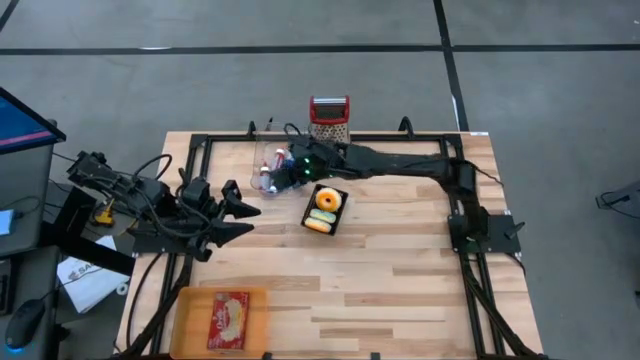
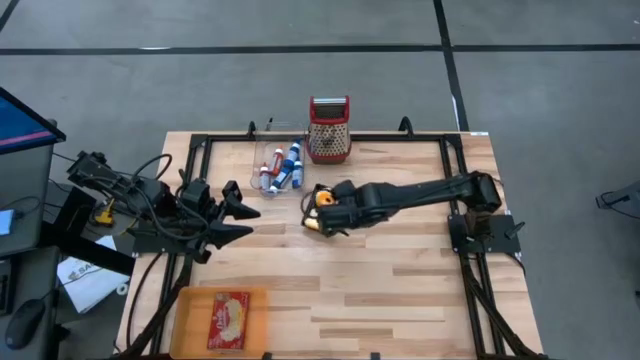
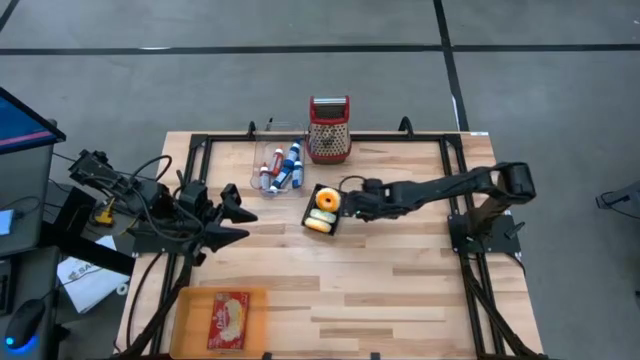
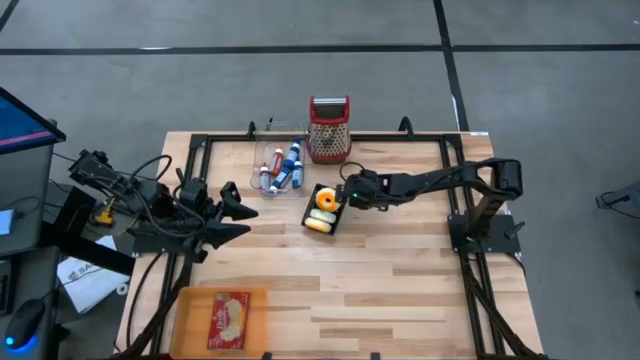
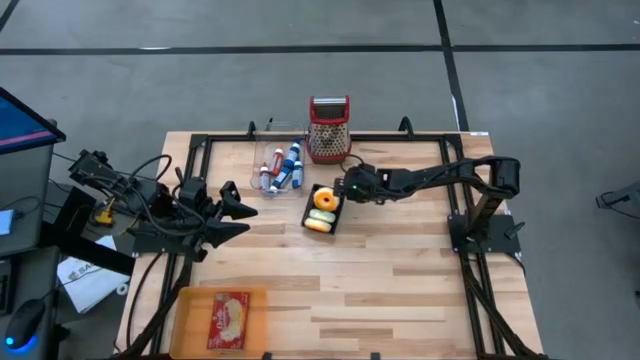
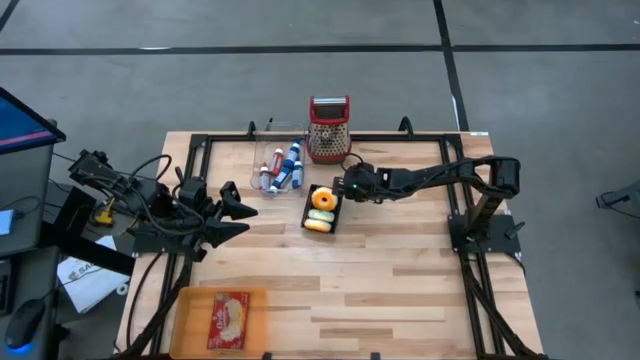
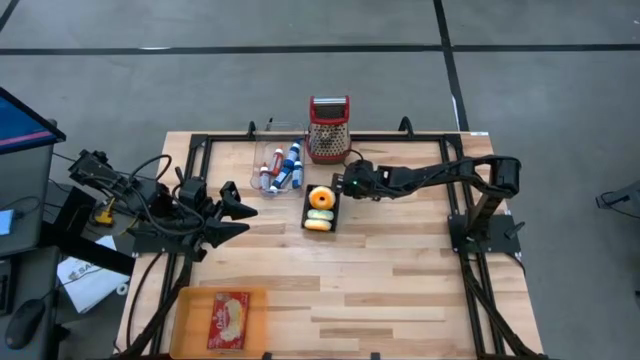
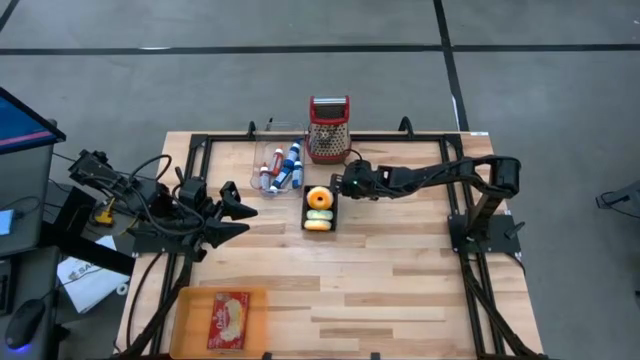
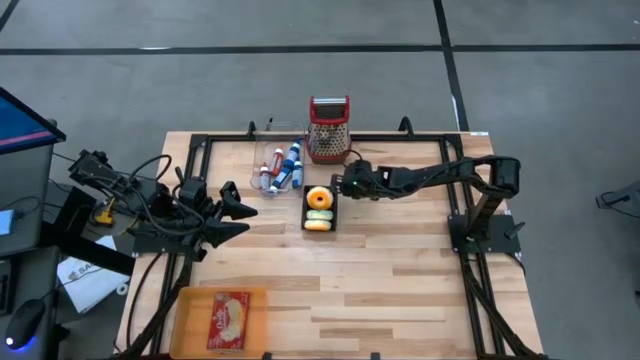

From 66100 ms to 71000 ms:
Adjust the black bin

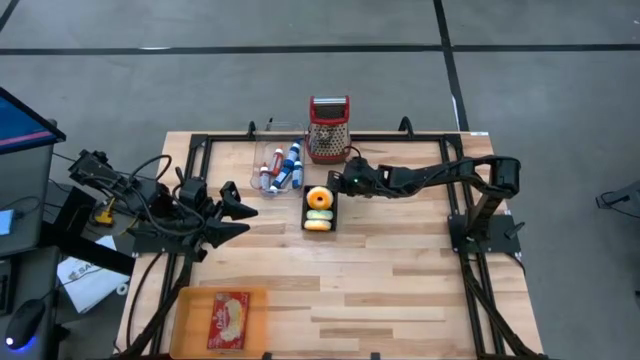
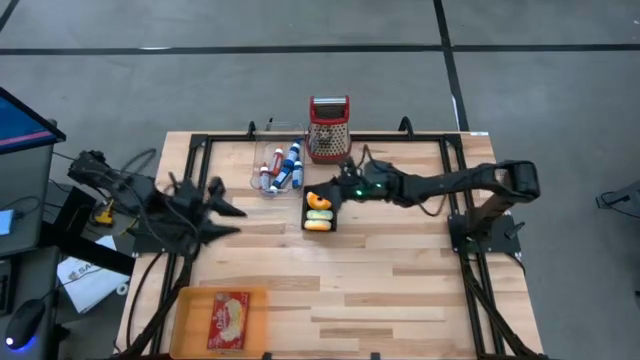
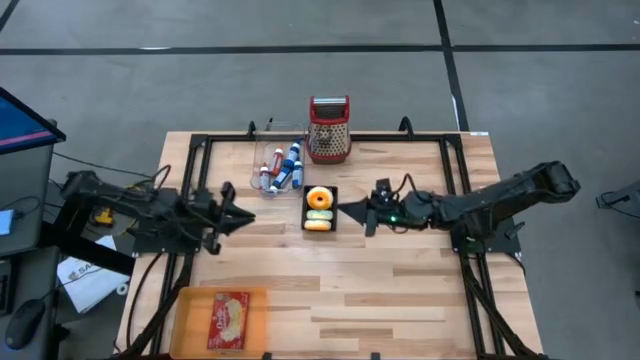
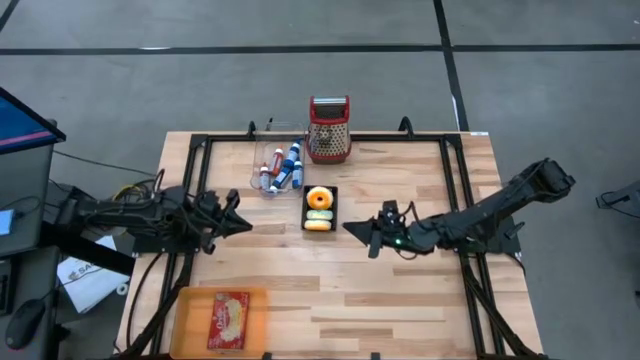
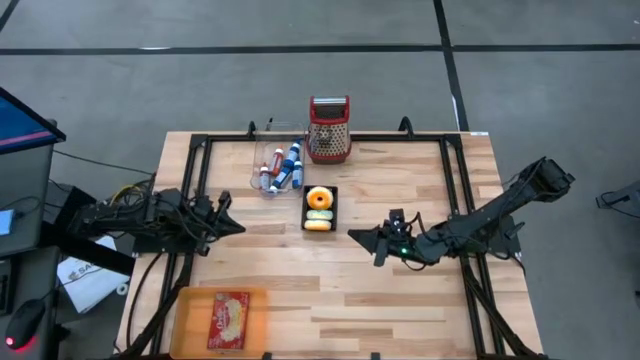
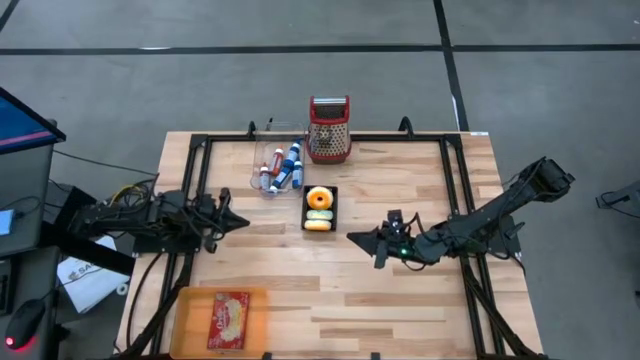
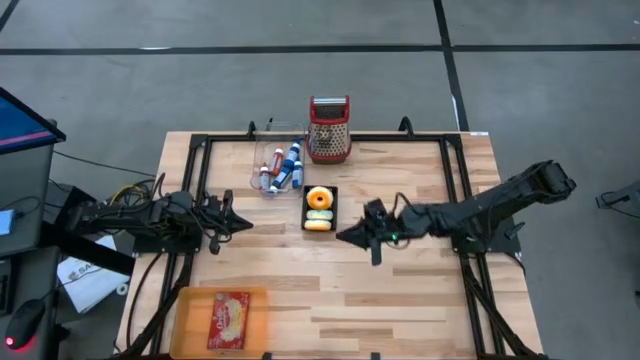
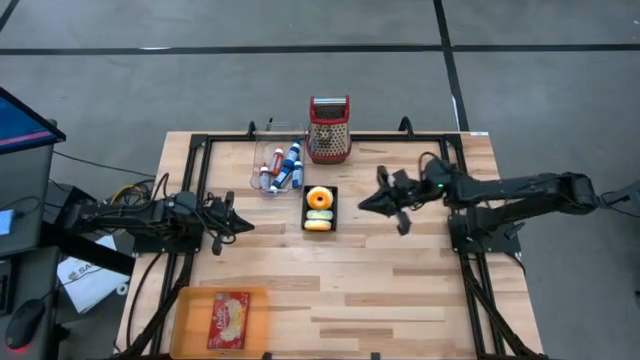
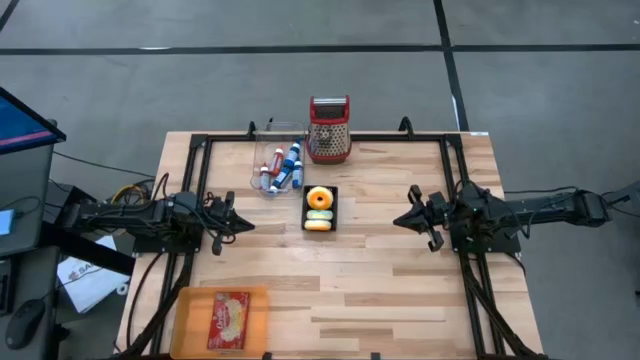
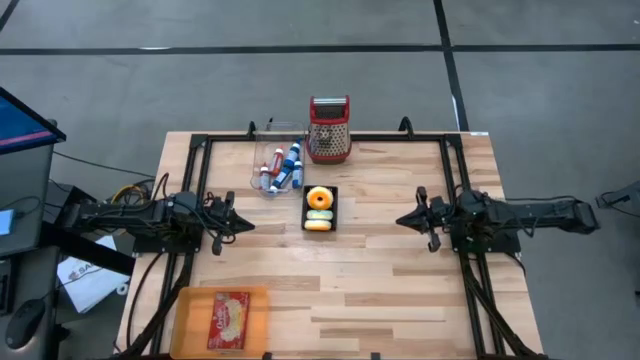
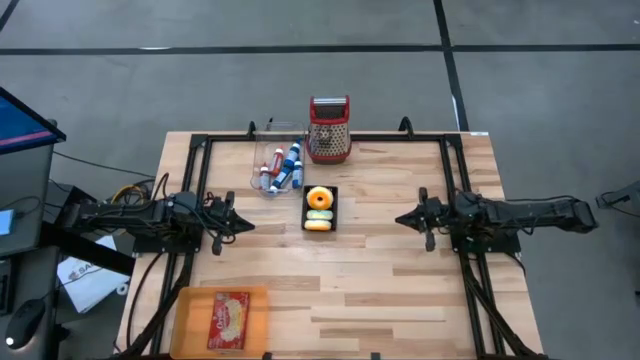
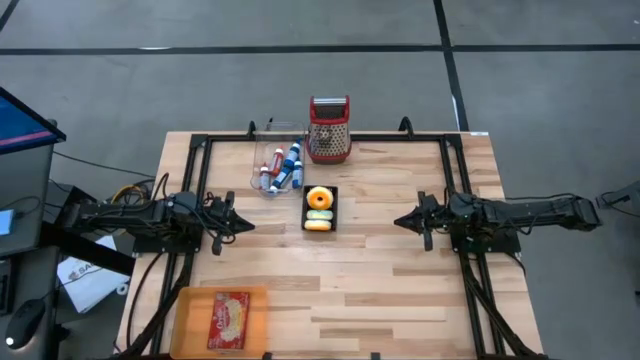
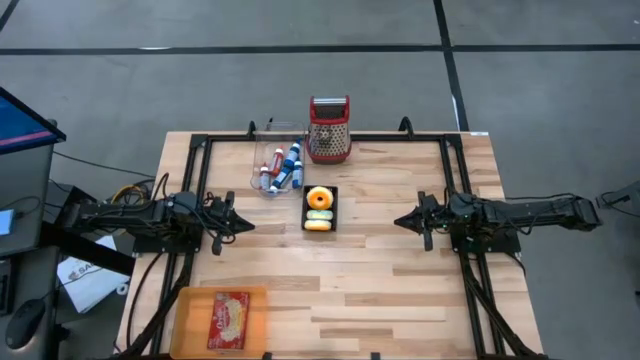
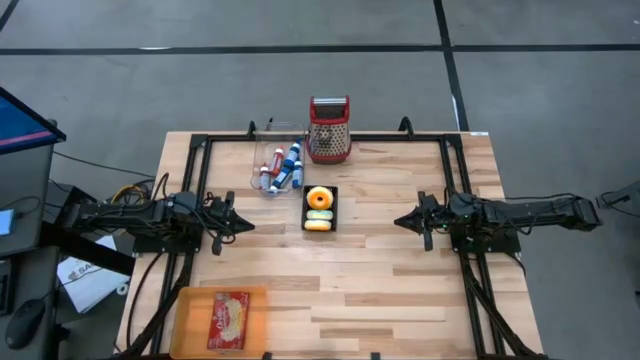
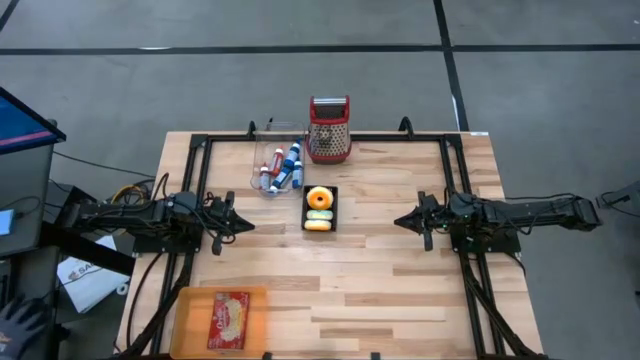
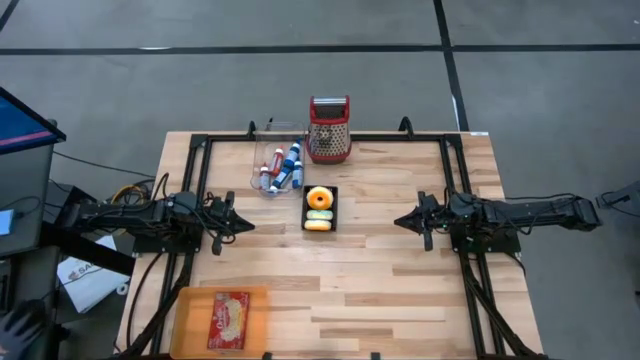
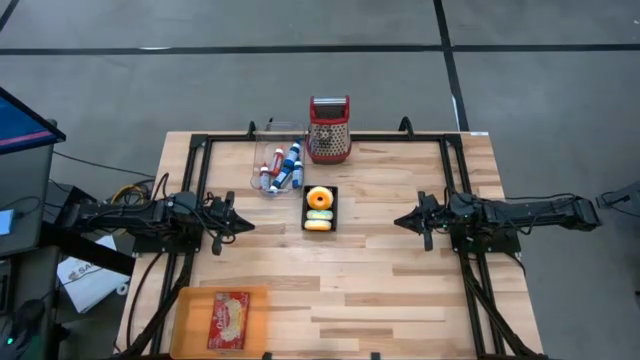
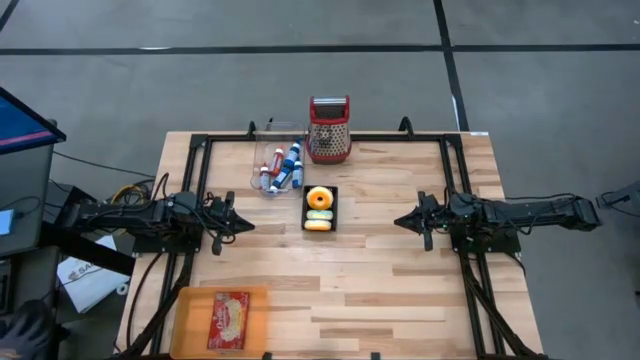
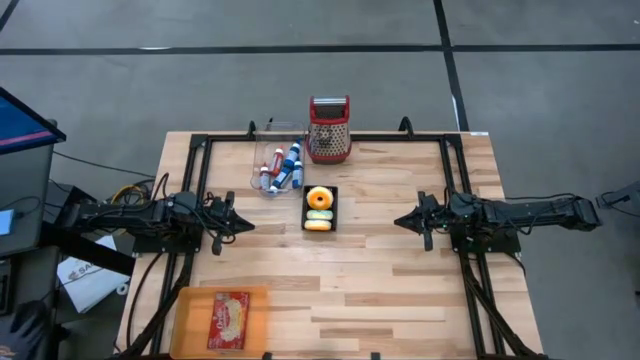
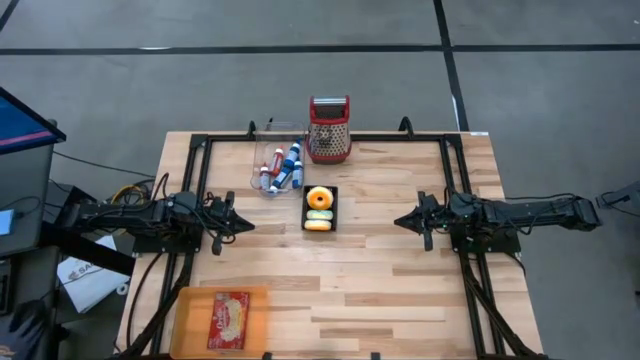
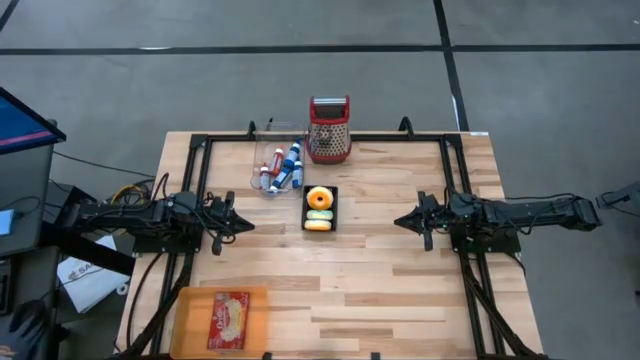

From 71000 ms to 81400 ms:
Return to Home Position

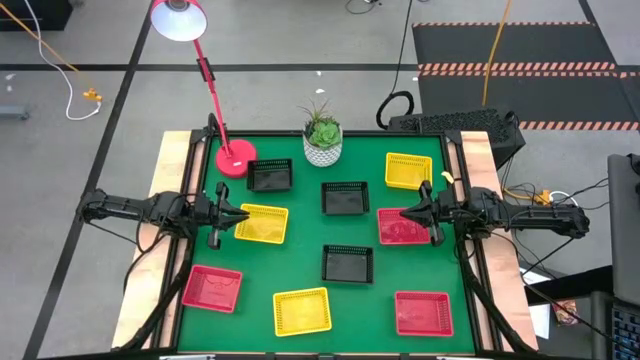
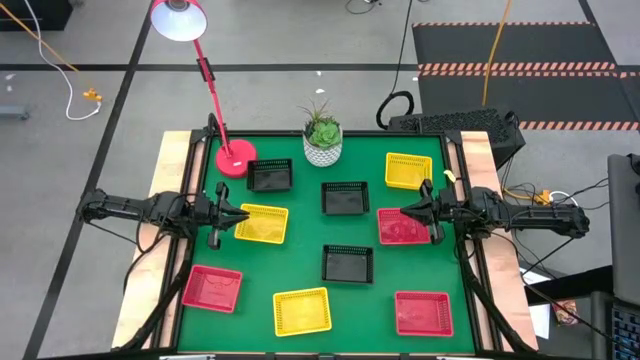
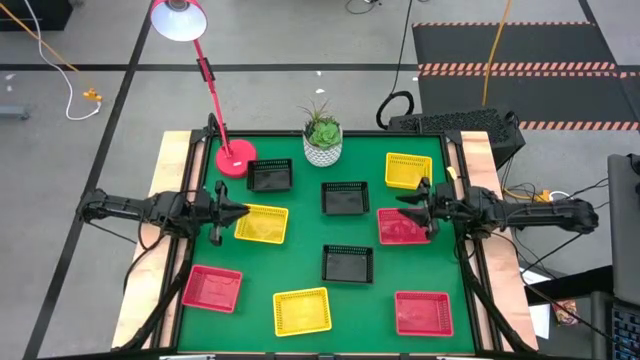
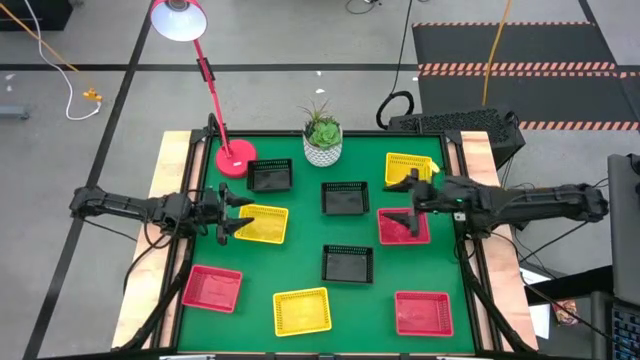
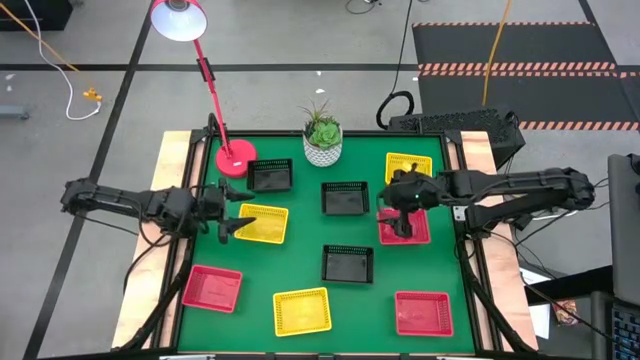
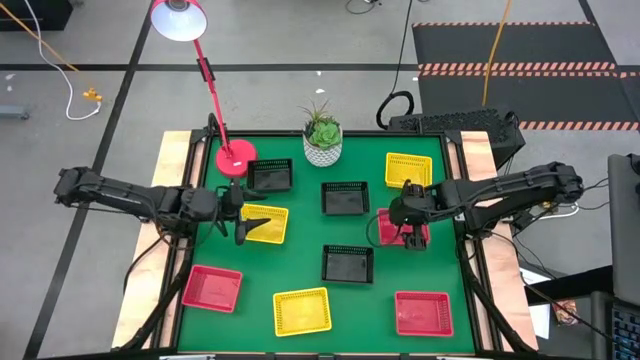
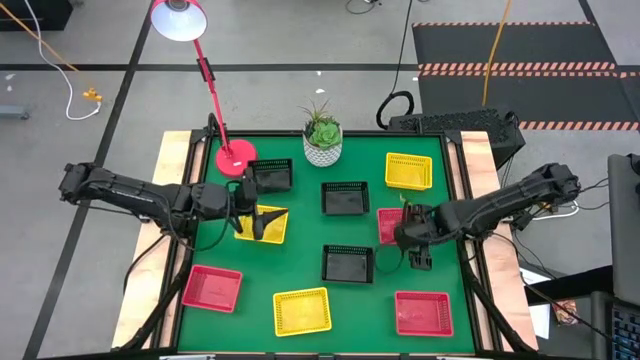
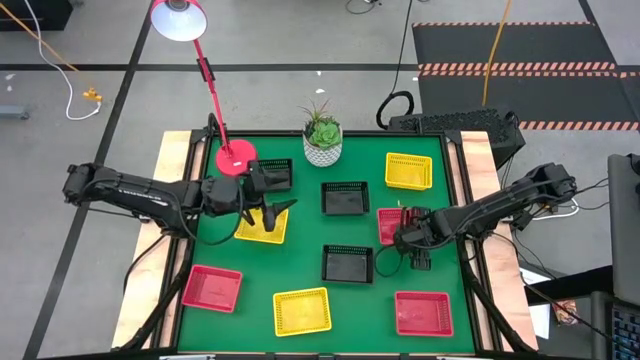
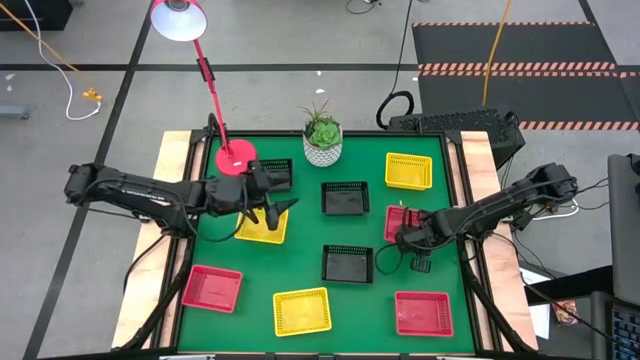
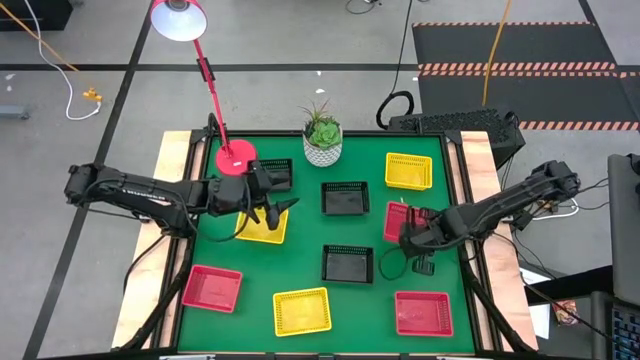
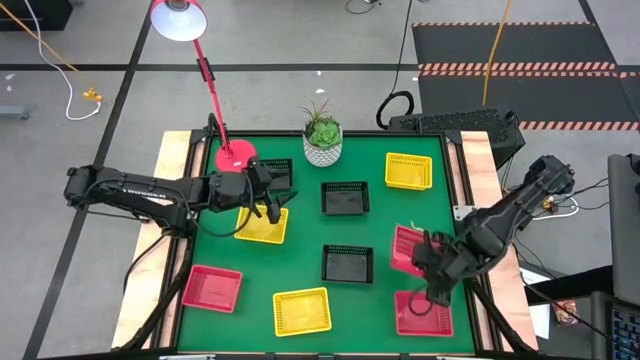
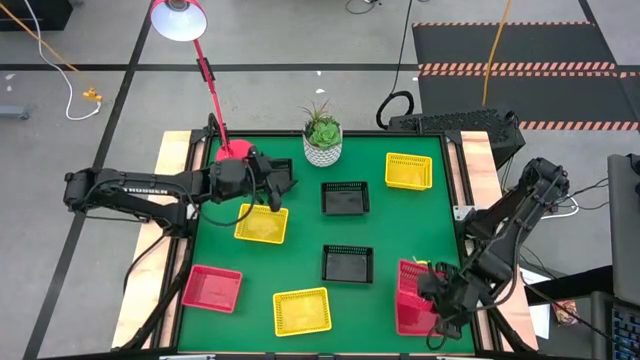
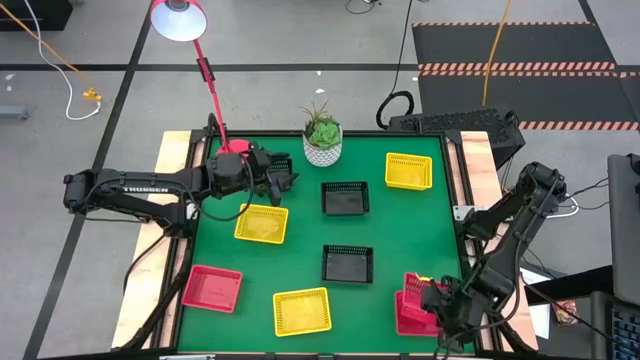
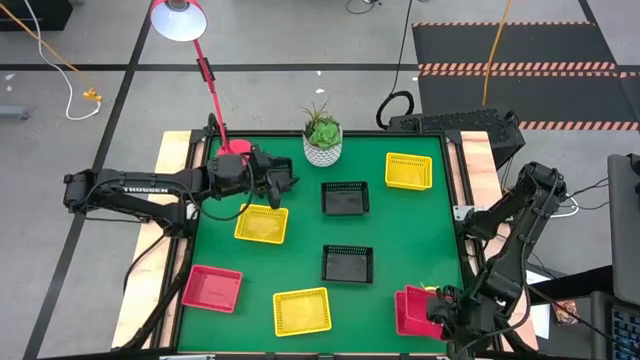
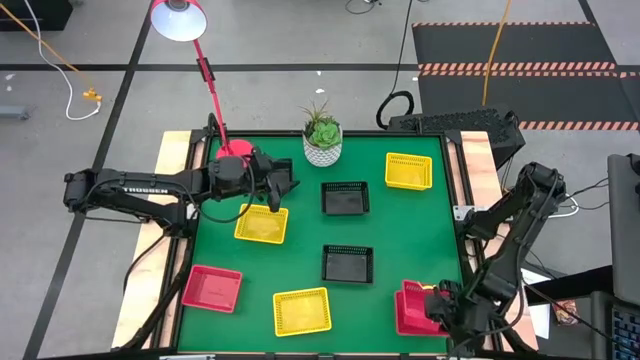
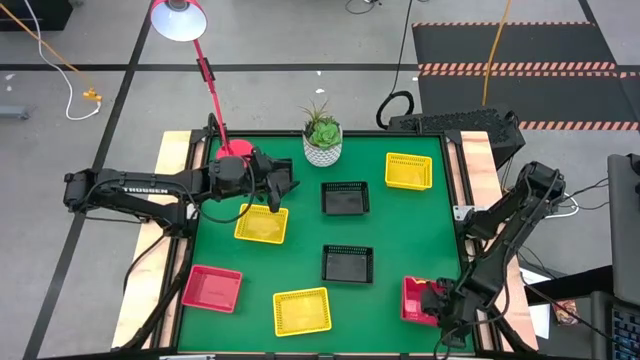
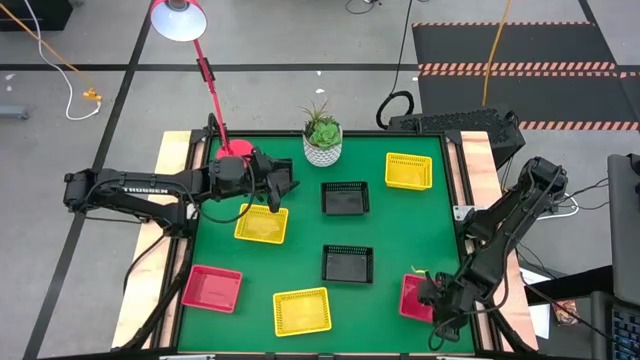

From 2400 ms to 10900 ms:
Stack the top right red bin on top of the bottom right red bin
